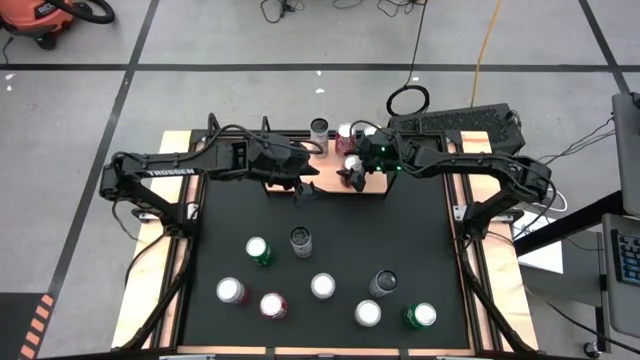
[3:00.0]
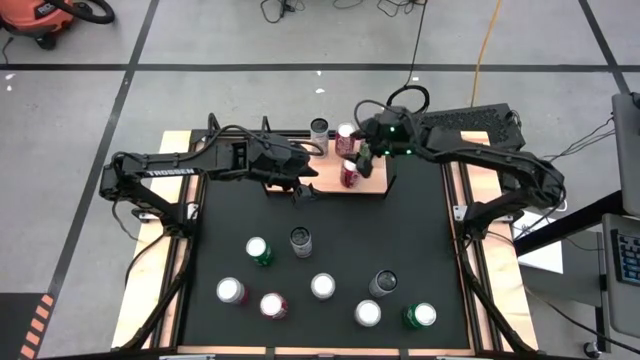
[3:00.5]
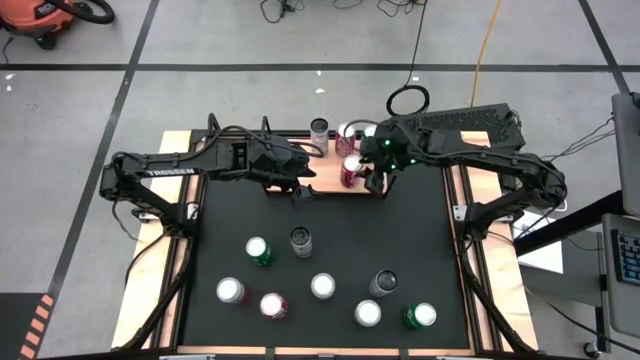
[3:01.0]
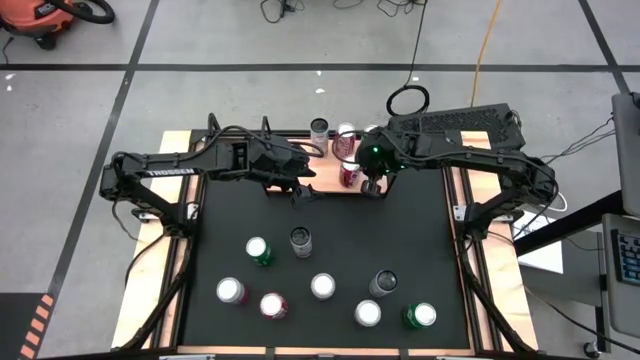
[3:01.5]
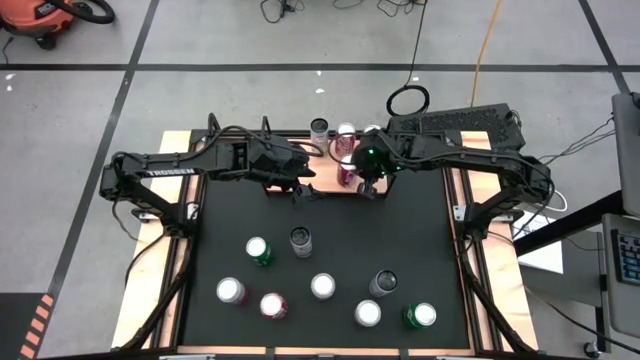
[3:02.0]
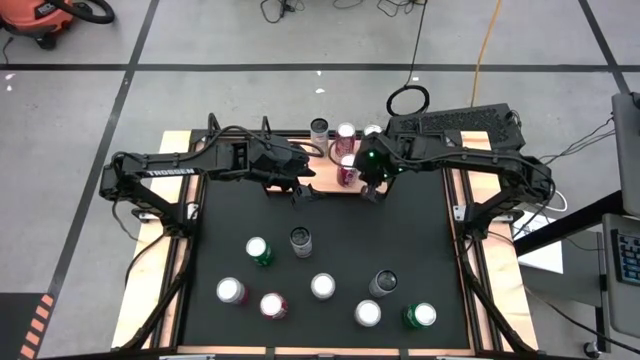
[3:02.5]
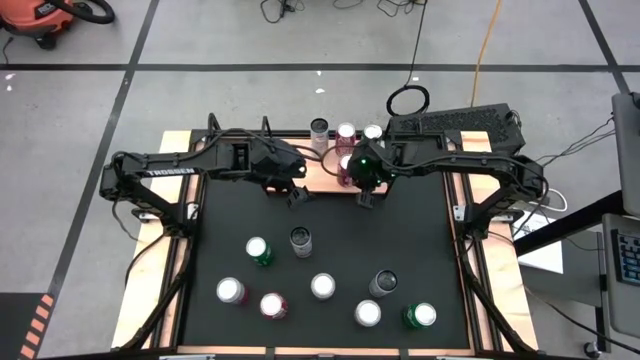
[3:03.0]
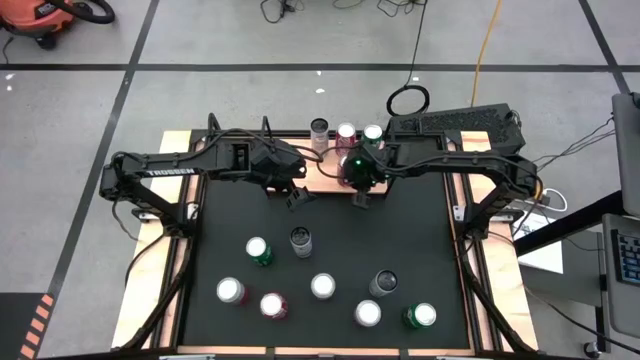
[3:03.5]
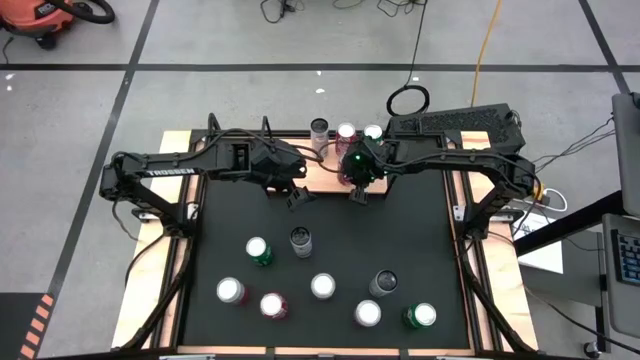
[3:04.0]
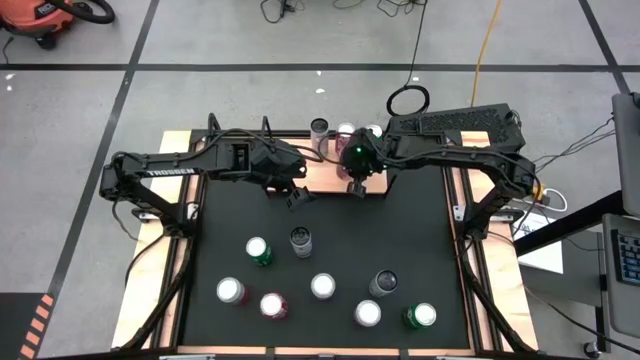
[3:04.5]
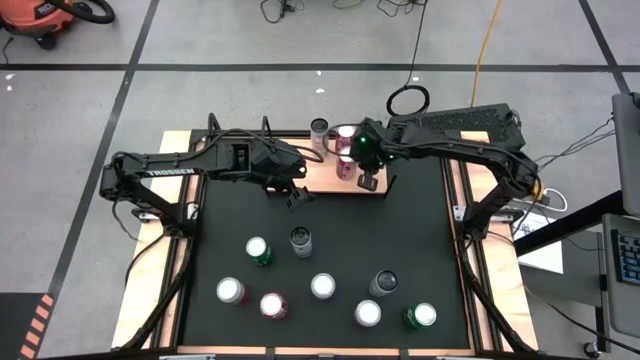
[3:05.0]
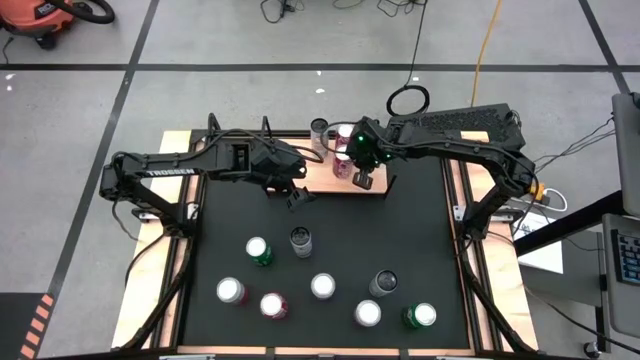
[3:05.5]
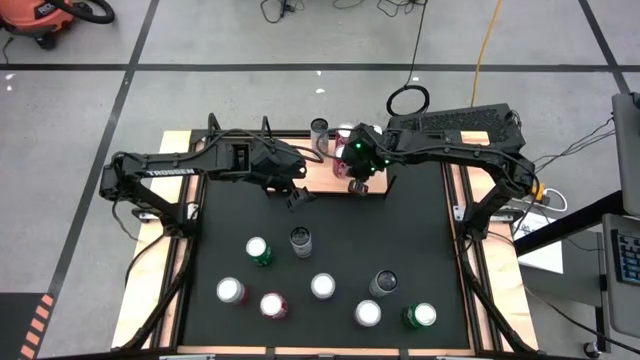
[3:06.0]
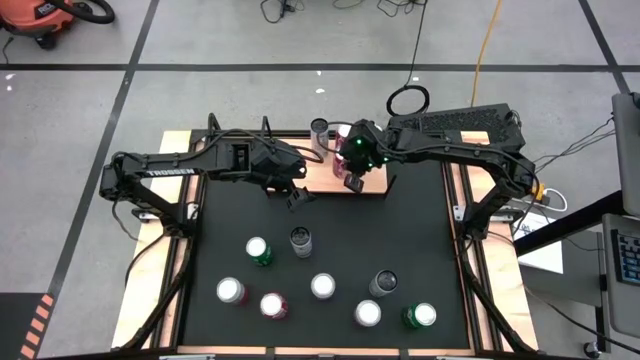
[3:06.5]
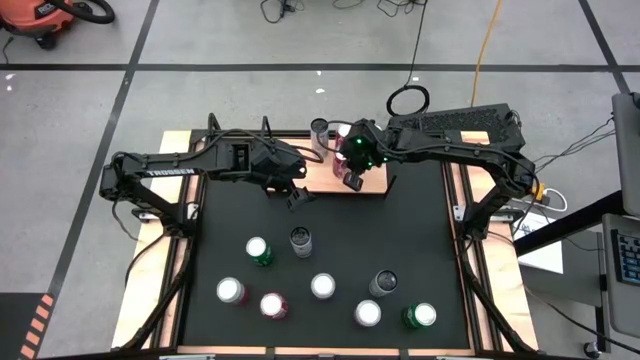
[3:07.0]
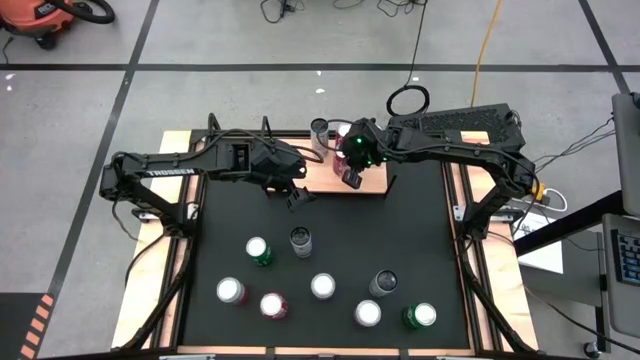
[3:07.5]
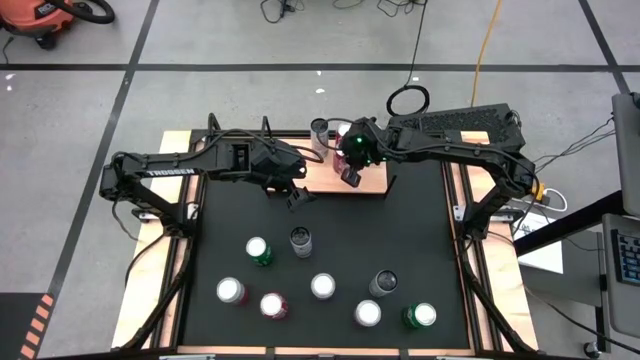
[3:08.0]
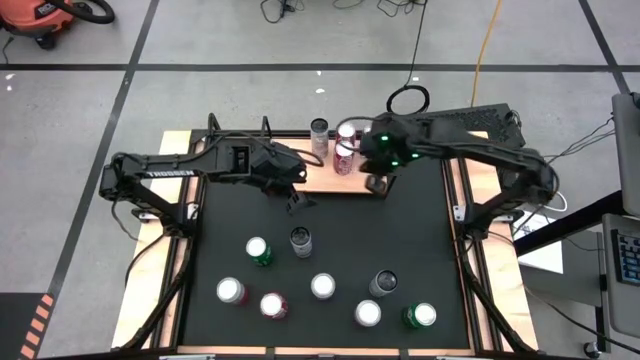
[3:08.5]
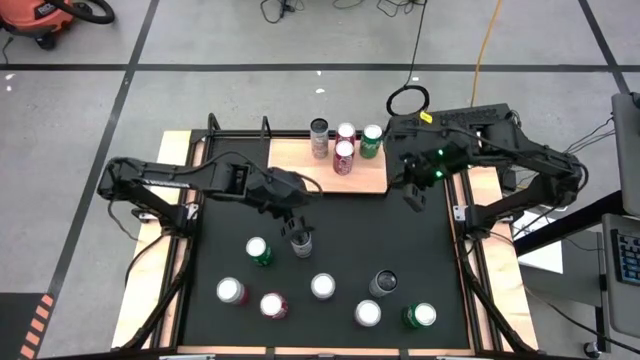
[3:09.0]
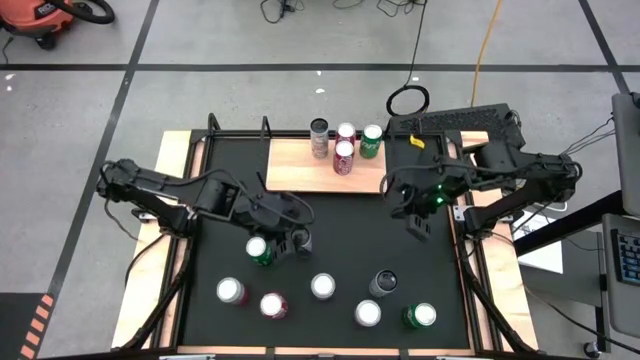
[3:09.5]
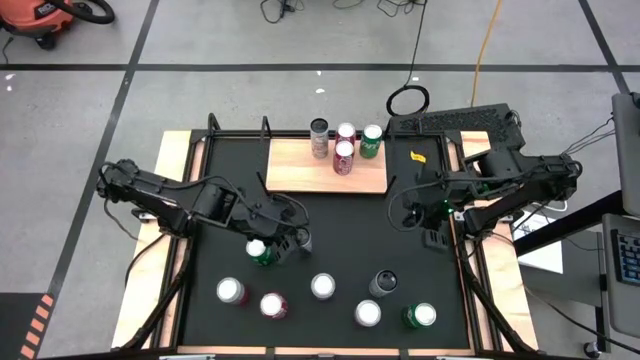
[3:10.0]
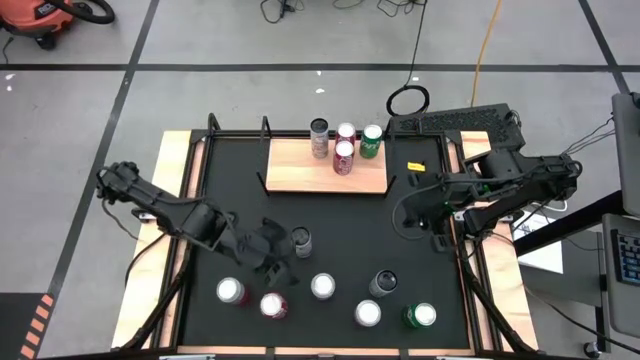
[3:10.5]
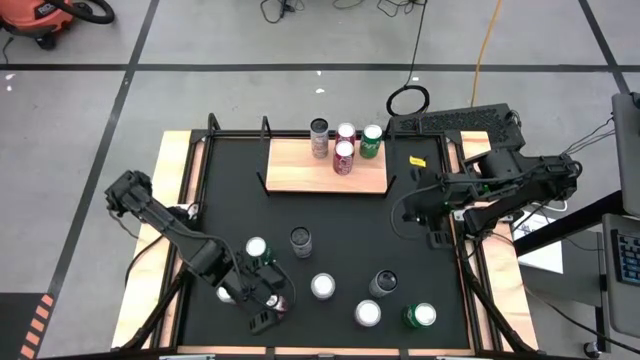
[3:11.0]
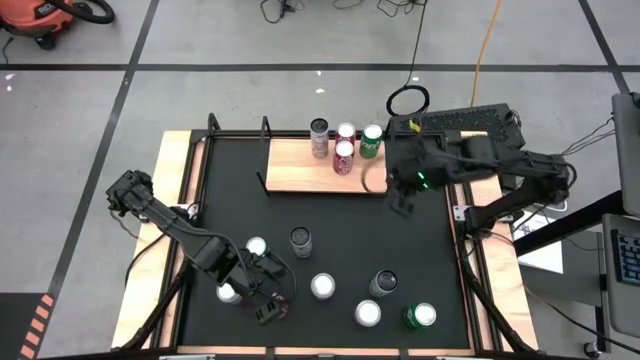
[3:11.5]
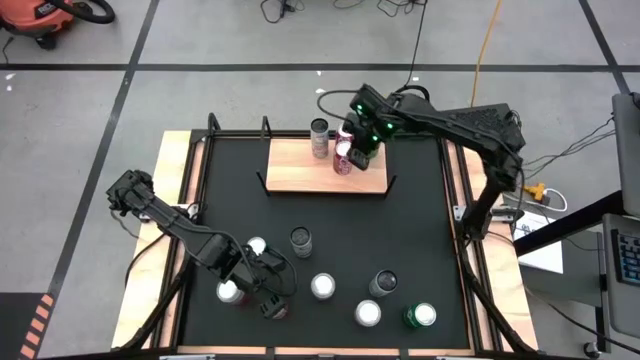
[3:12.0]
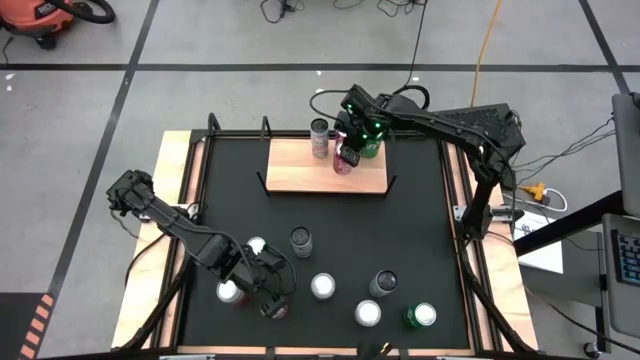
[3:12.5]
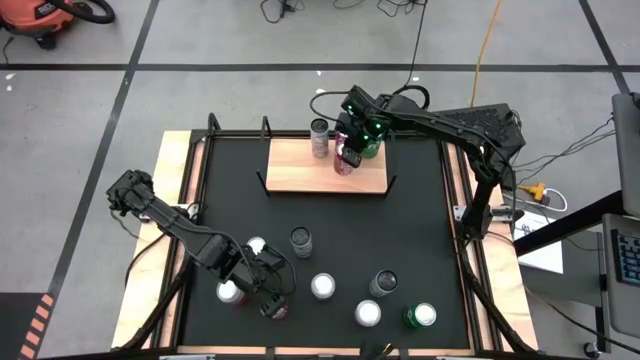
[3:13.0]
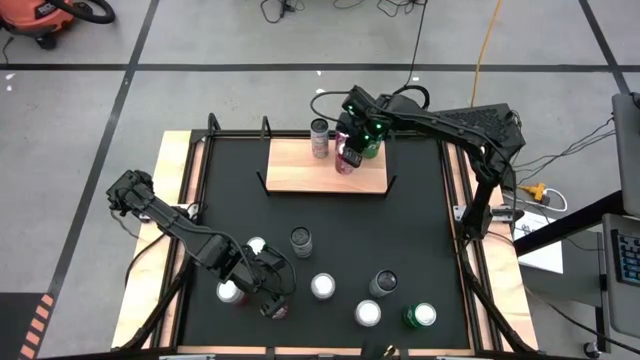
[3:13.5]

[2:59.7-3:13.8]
Task: Place canned beverage on shelf
Adjust the red soda can on the shelf

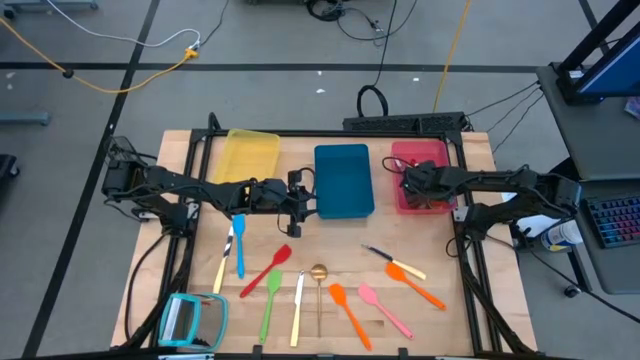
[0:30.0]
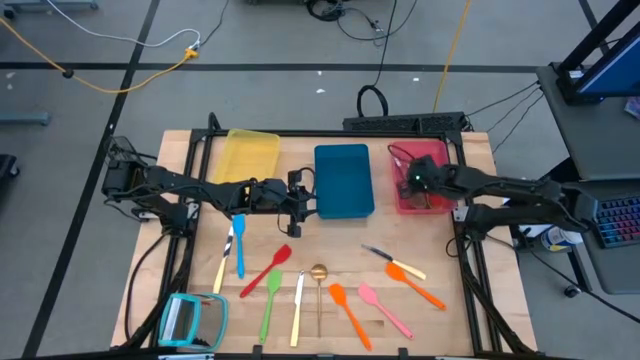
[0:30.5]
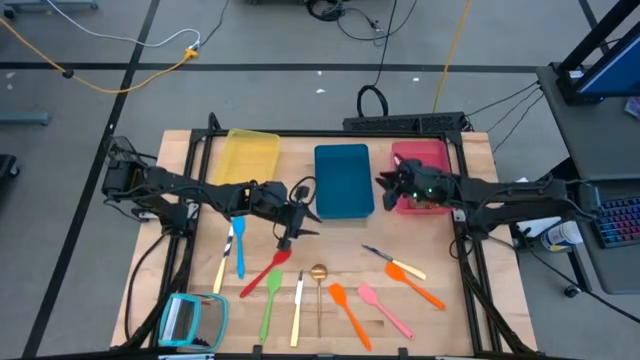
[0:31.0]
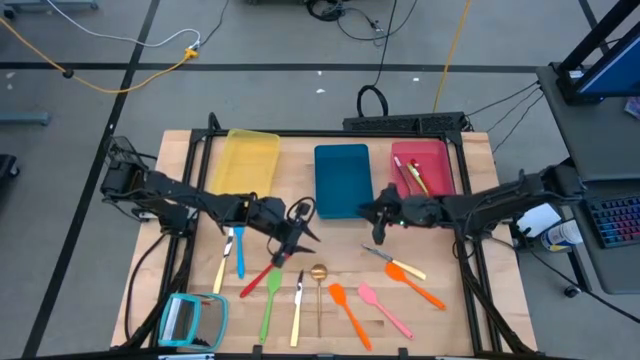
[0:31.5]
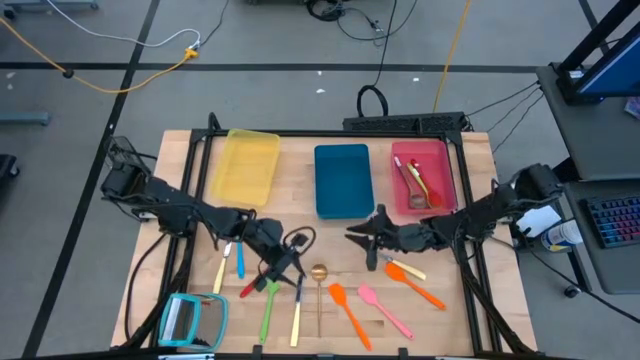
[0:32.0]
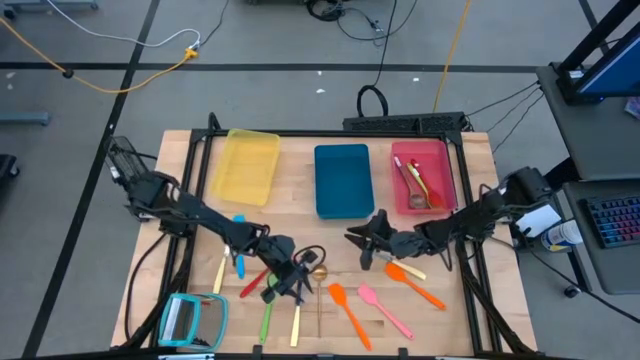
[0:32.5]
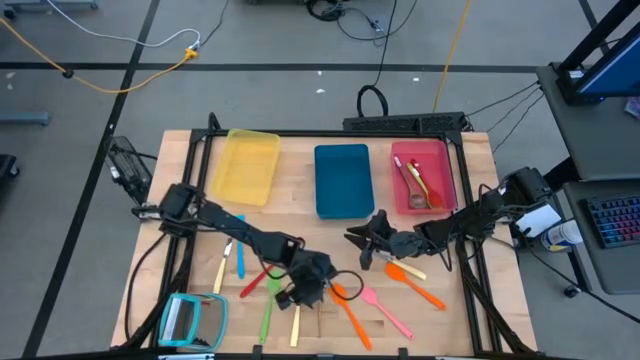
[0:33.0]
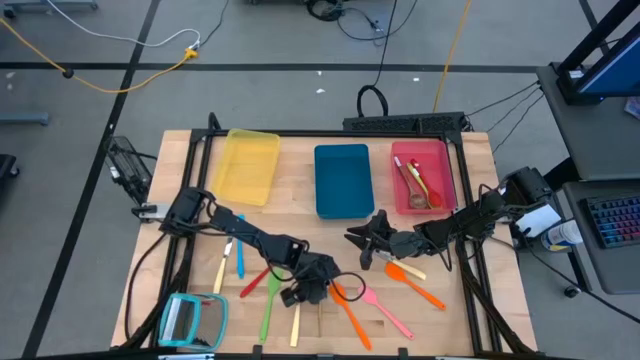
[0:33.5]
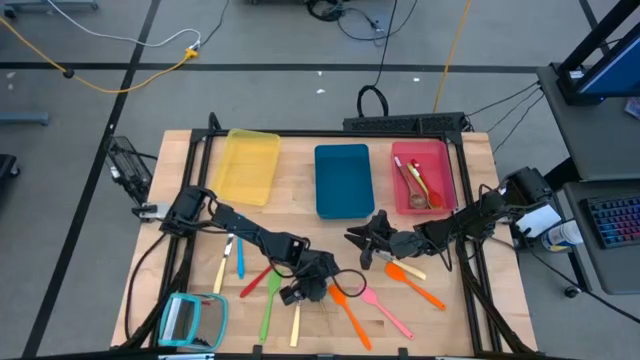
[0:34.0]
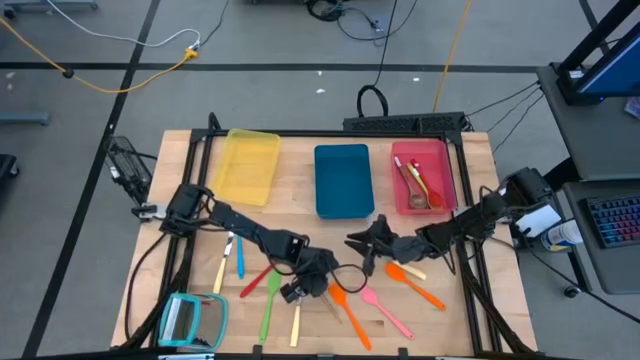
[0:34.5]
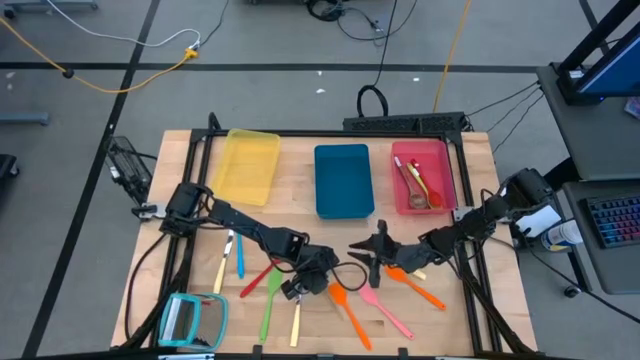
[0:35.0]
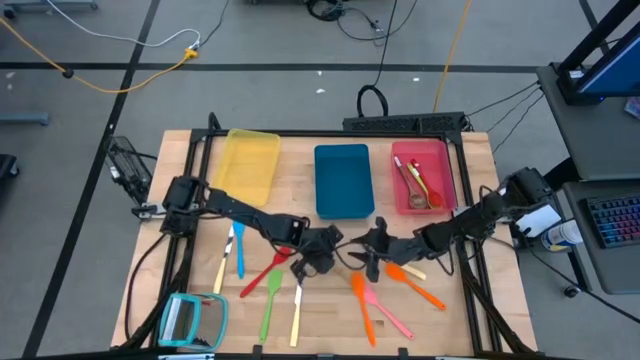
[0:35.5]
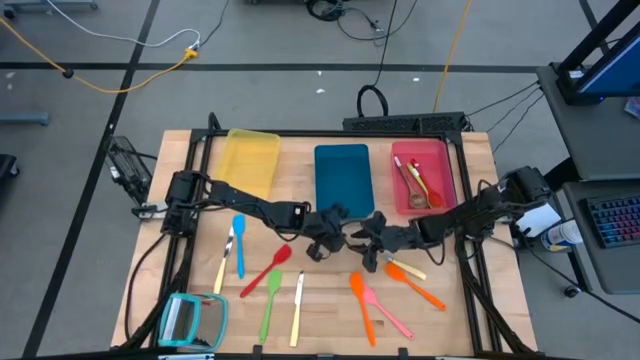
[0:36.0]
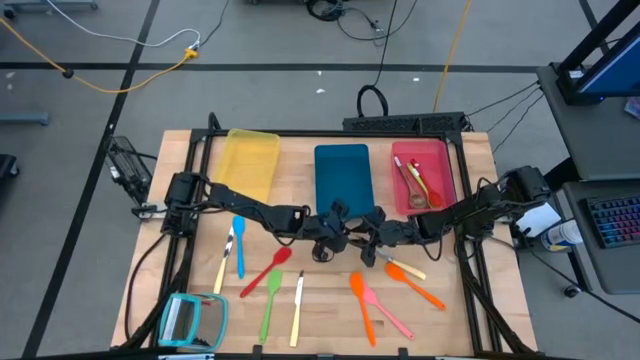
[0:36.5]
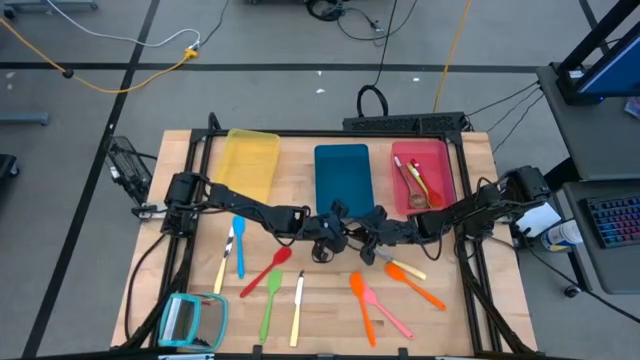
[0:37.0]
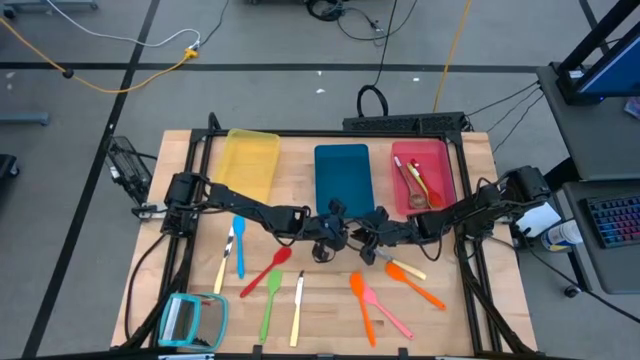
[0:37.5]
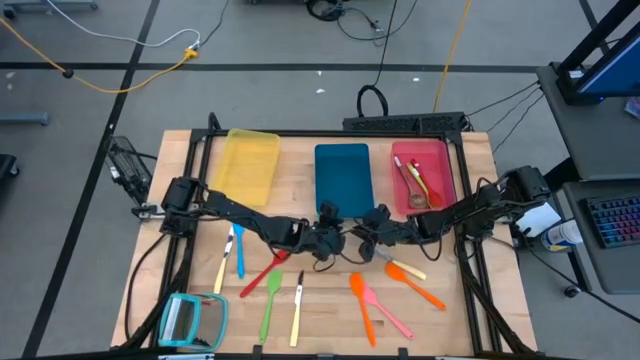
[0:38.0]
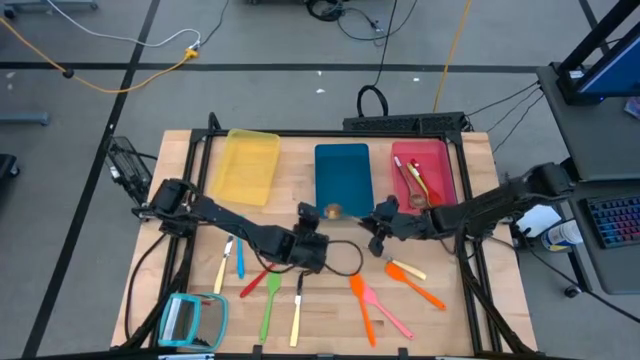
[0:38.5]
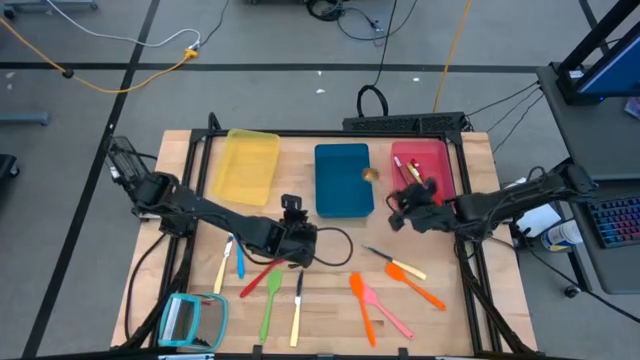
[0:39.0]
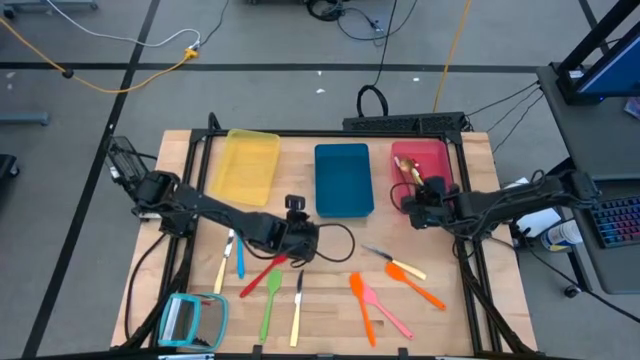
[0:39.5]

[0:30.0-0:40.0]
Task: Pick & Place Kitchen Items
Put the gold serving spoon into the red bin
